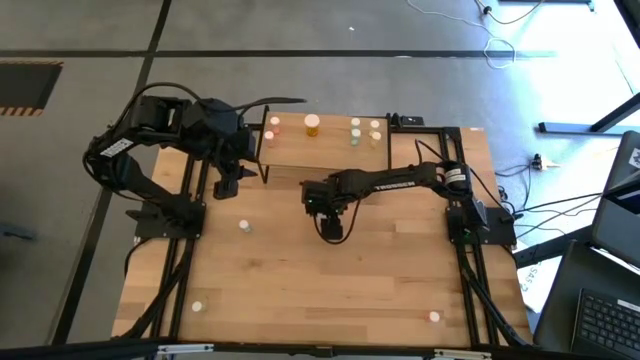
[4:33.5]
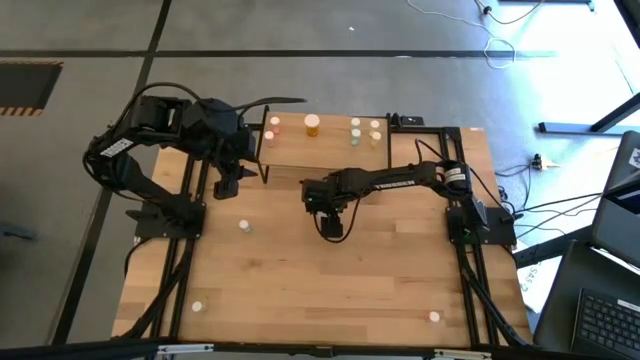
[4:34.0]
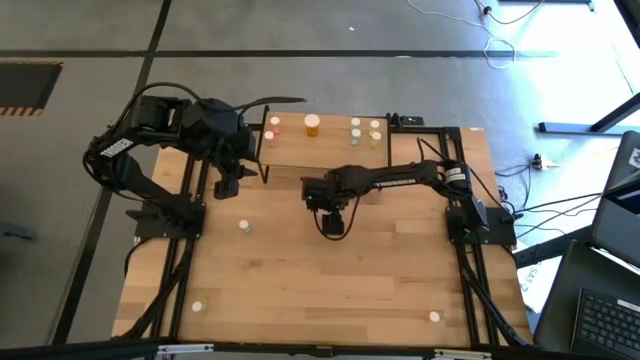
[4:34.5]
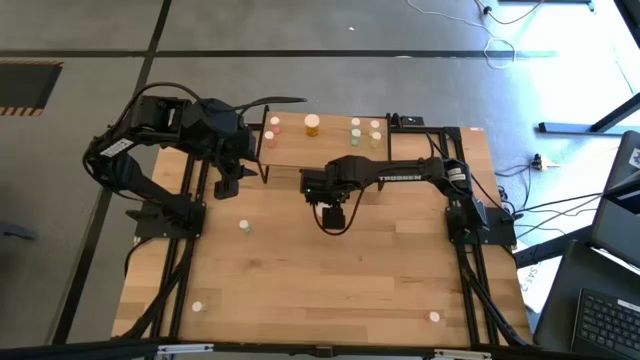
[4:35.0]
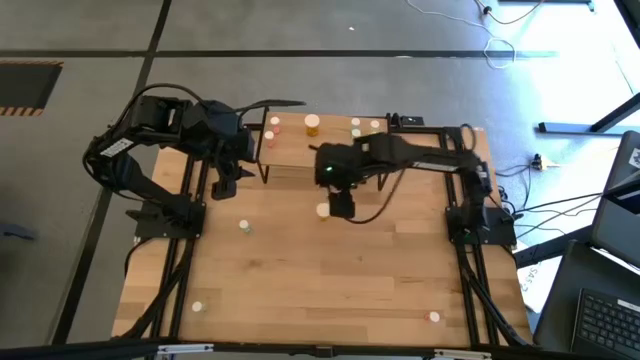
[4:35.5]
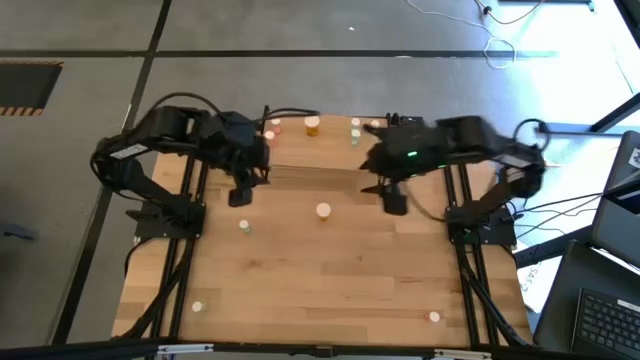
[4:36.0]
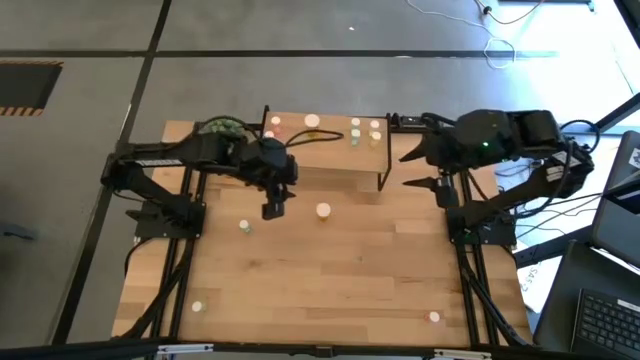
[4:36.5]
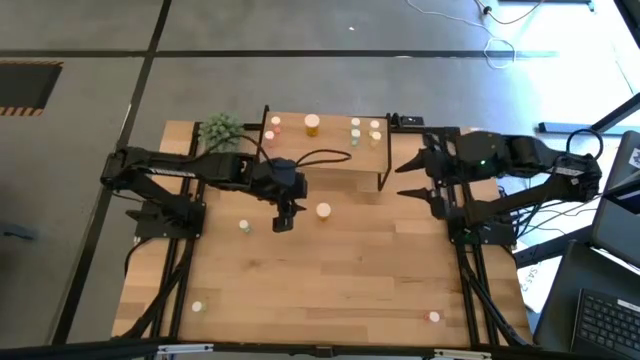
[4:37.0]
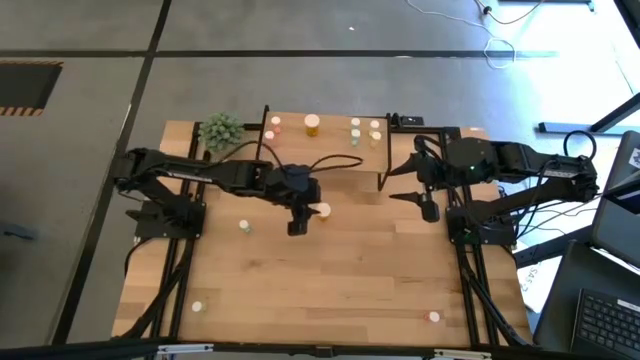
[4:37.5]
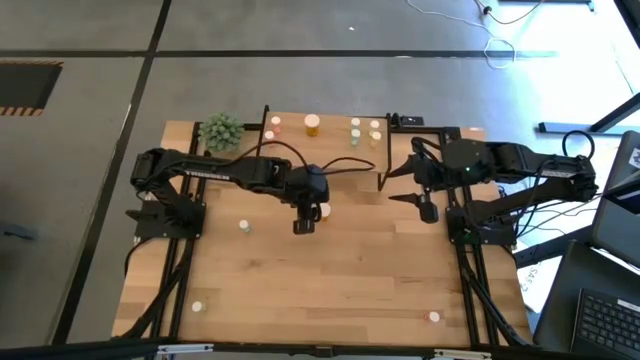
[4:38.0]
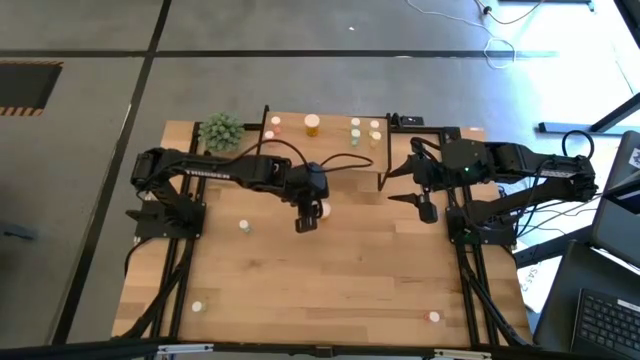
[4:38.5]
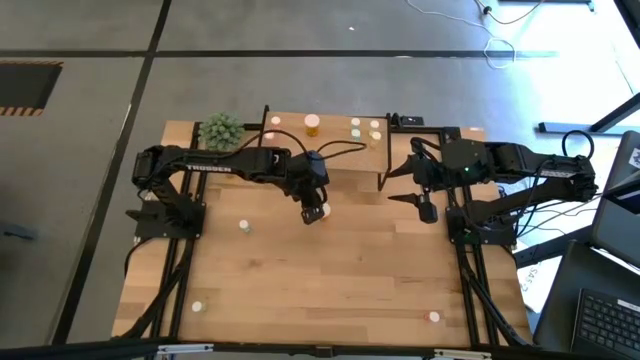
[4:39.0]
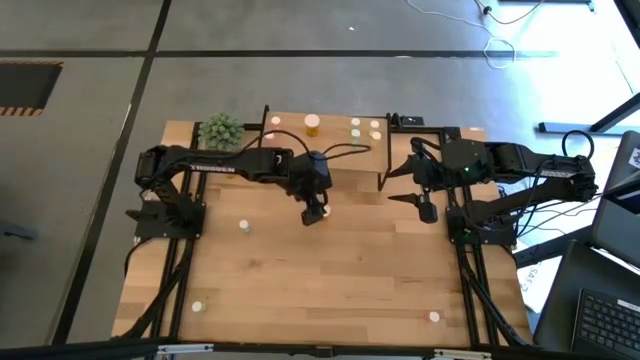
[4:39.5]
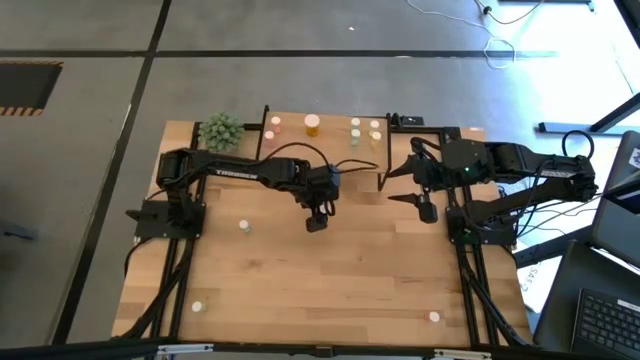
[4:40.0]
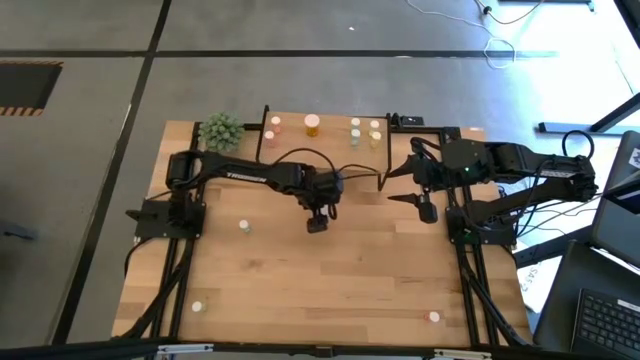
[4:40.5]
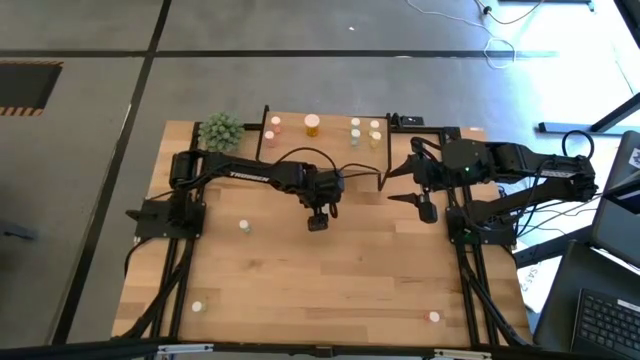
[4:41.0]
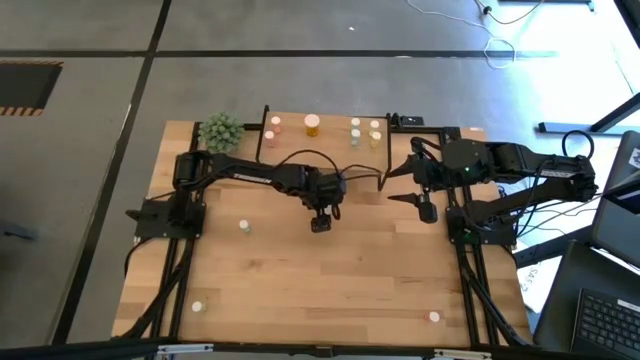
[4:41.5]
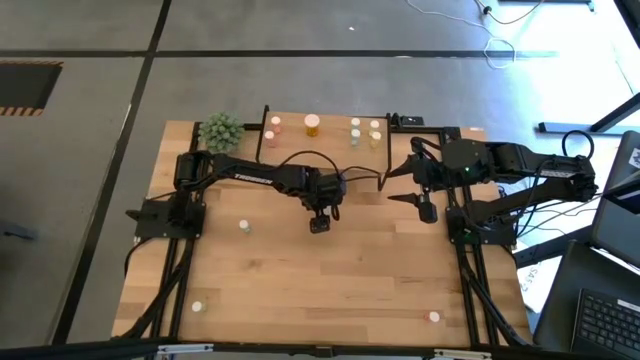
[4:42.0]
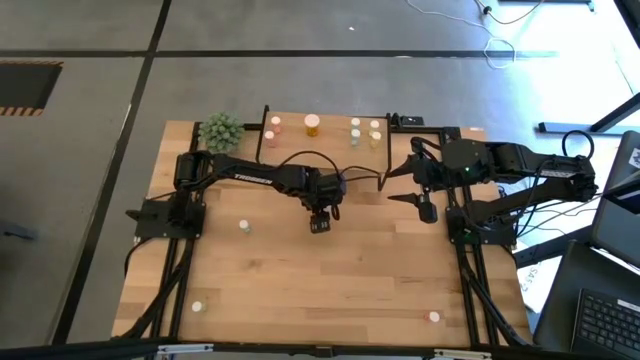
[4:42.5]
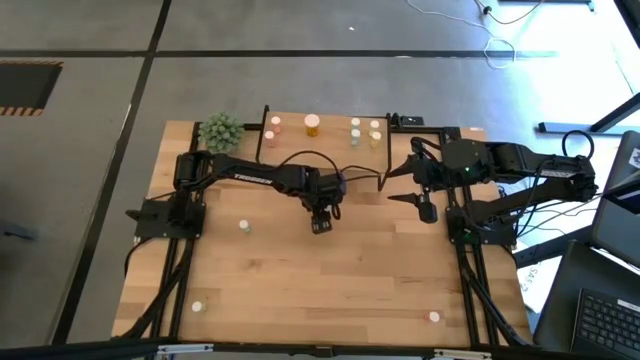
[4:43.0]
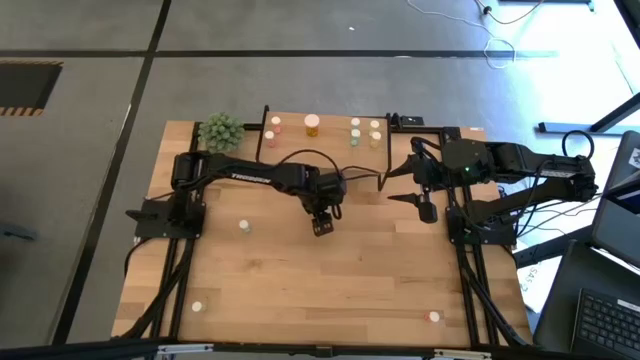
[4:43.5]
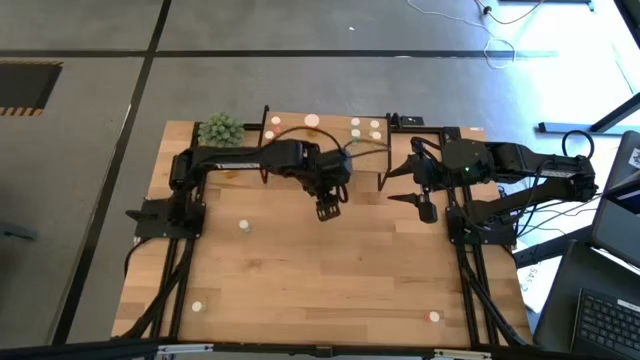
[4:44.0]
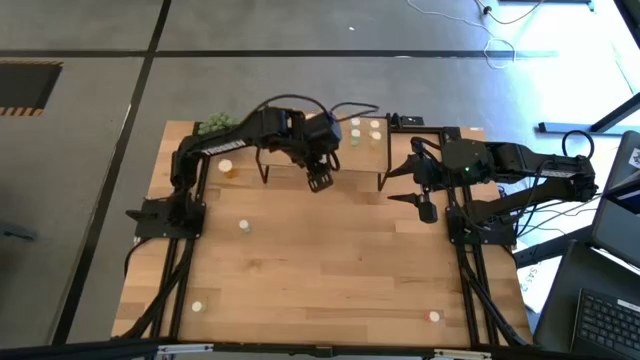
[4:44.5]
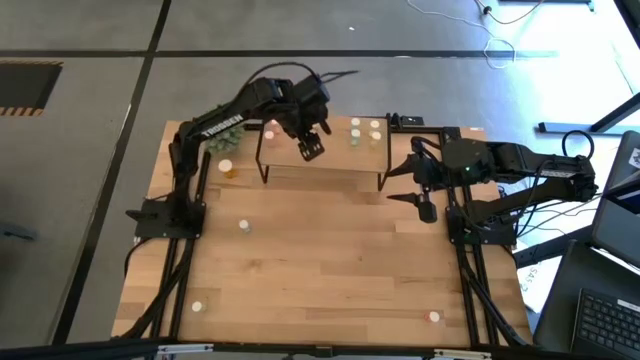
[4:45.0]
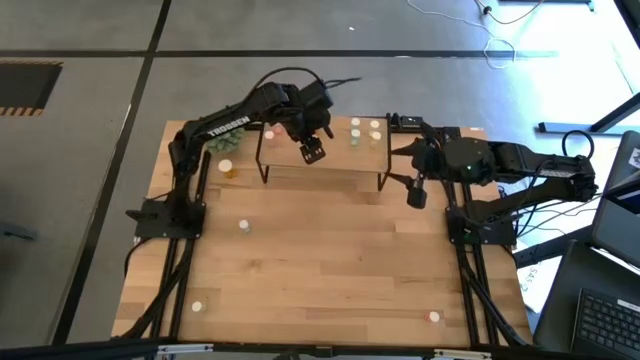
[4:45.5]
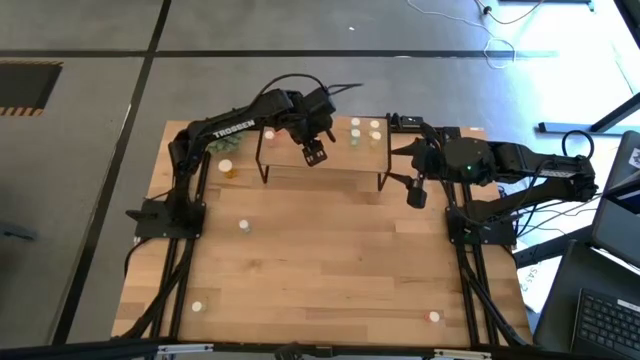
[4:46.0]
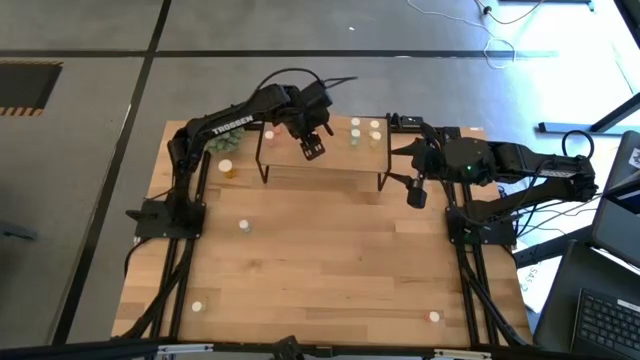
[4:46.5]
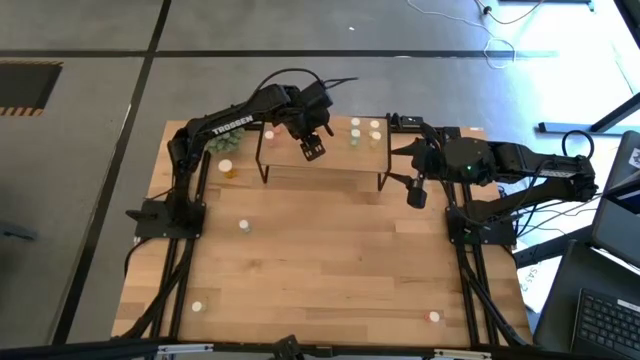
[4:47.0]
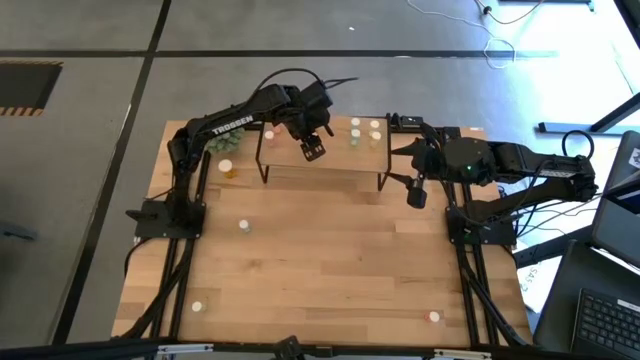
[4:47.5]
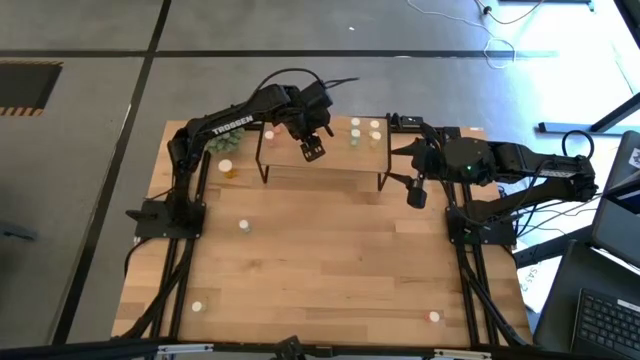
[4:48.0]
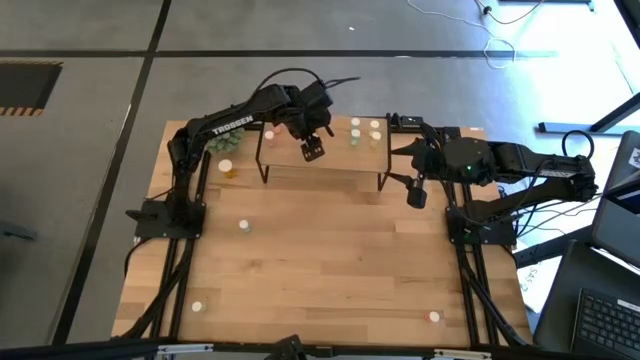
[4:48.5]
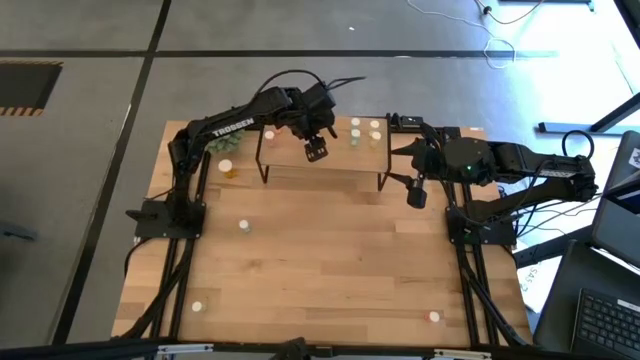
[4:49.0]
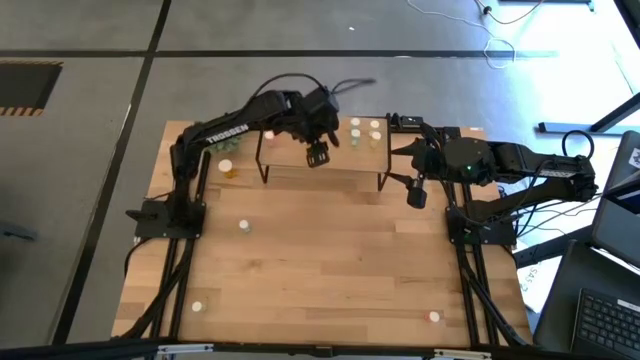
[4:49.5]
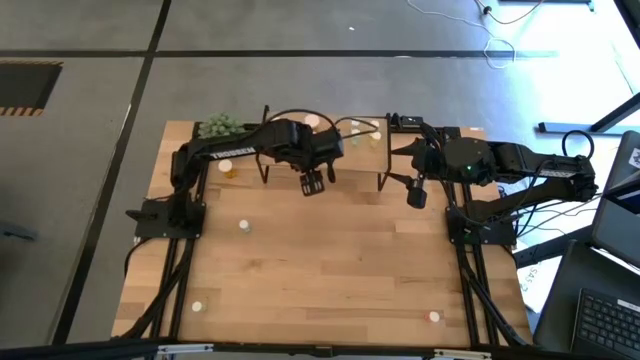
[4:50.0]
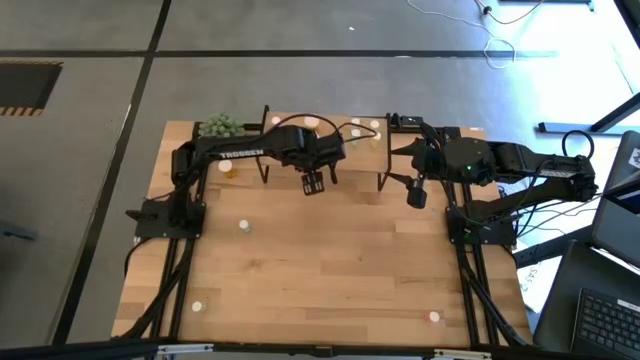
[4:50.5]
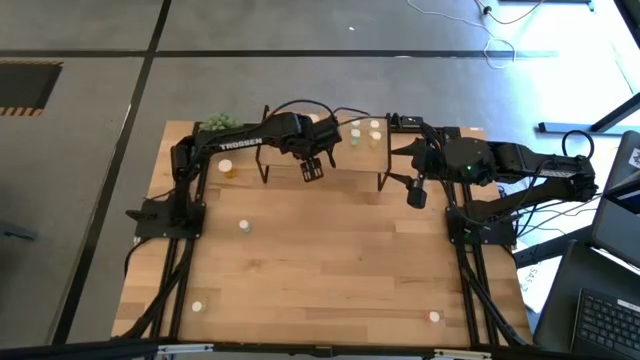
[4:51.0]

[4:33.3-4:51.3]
Task: Pick and place medicine bottles onto shelf by color
Put the orange medicine bottle on the shelf, aligned with the other orange medicine bottle
